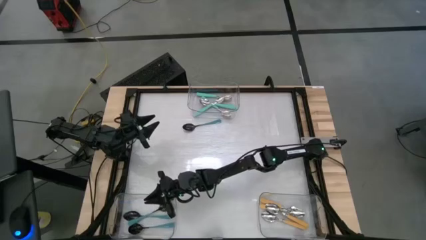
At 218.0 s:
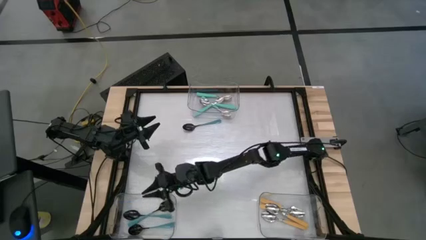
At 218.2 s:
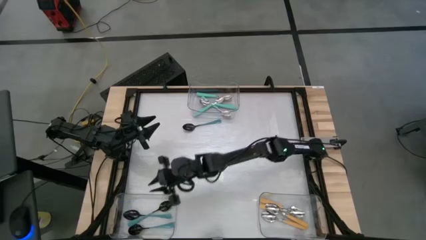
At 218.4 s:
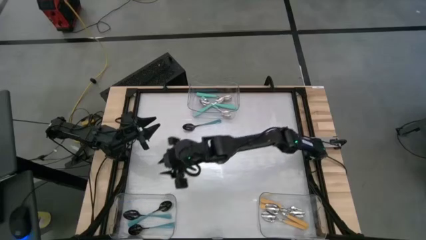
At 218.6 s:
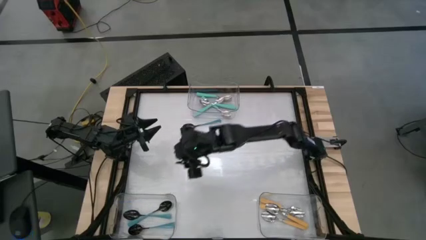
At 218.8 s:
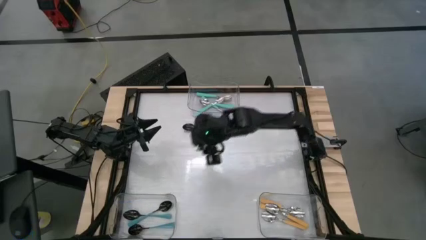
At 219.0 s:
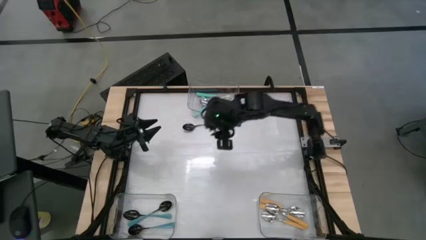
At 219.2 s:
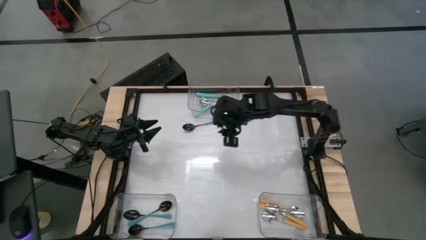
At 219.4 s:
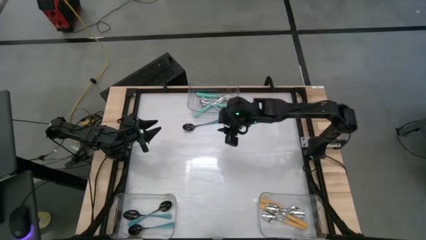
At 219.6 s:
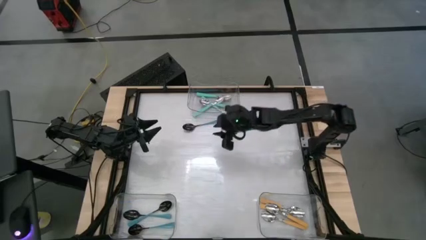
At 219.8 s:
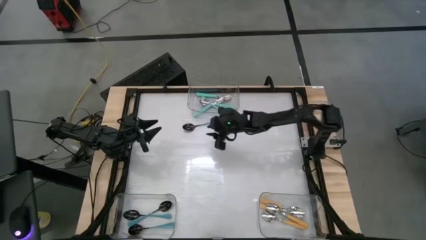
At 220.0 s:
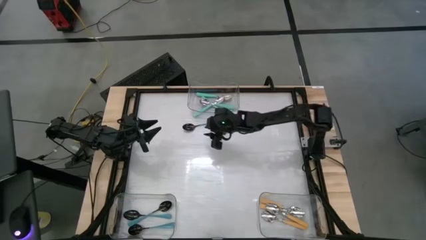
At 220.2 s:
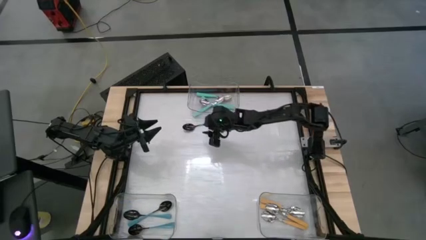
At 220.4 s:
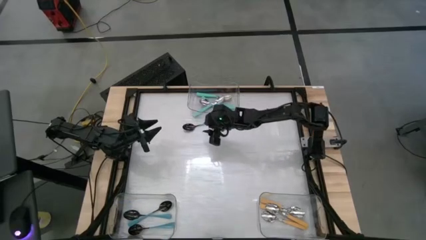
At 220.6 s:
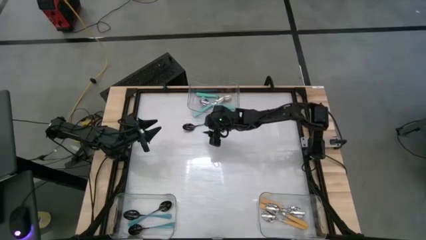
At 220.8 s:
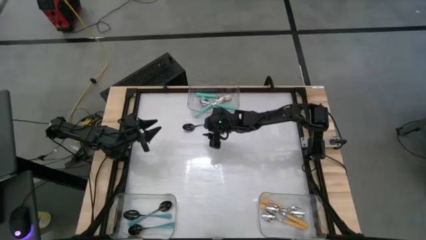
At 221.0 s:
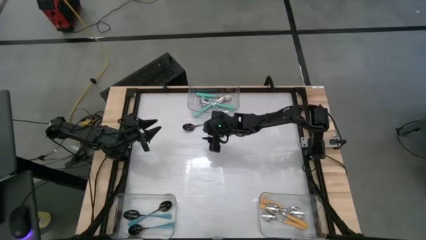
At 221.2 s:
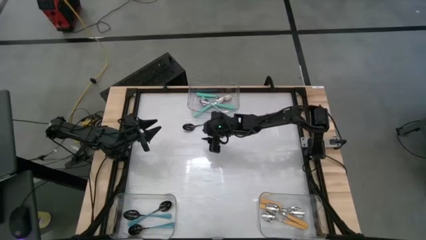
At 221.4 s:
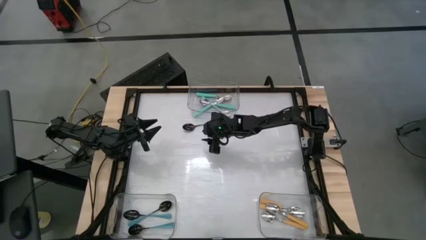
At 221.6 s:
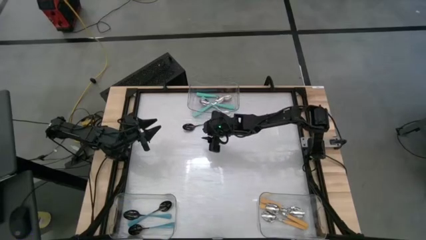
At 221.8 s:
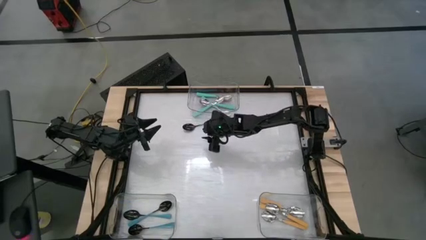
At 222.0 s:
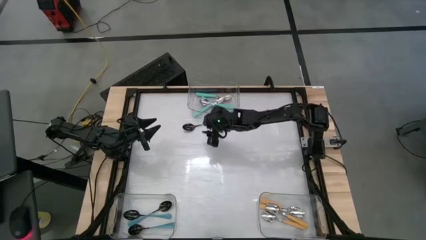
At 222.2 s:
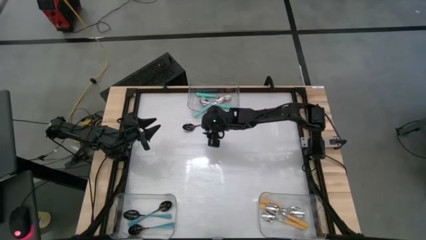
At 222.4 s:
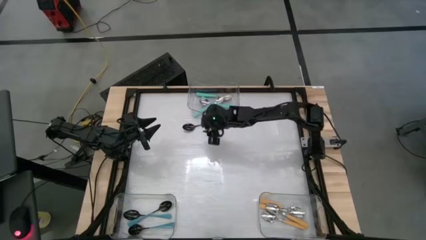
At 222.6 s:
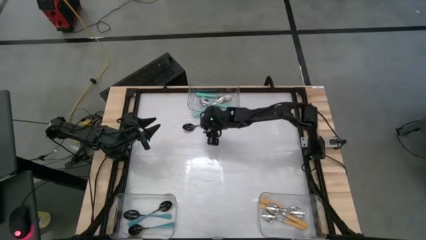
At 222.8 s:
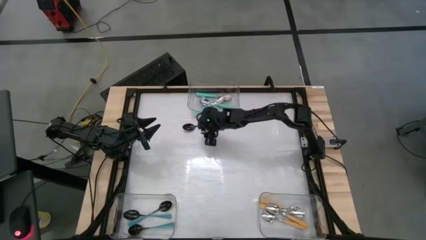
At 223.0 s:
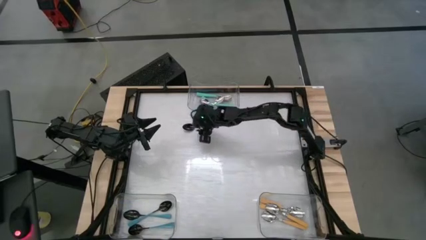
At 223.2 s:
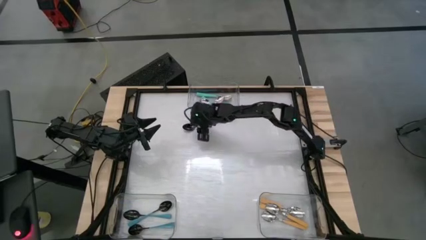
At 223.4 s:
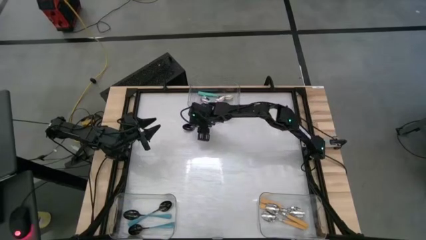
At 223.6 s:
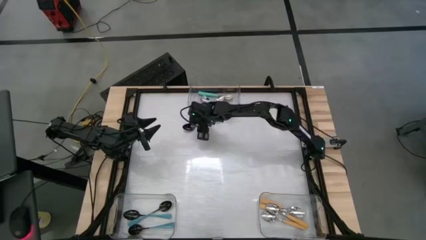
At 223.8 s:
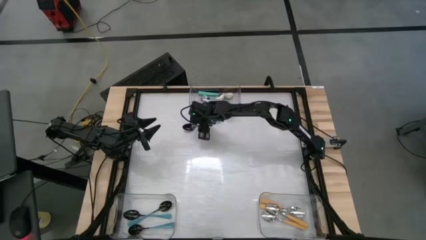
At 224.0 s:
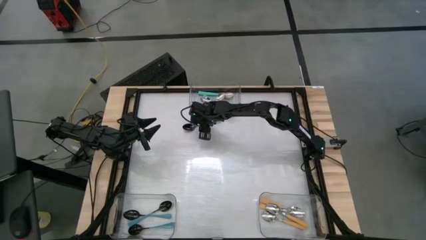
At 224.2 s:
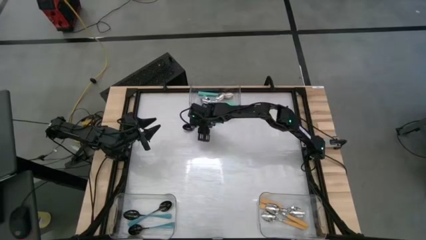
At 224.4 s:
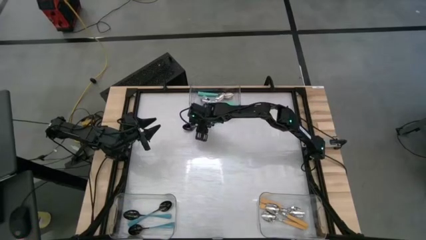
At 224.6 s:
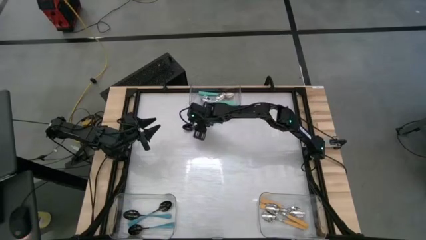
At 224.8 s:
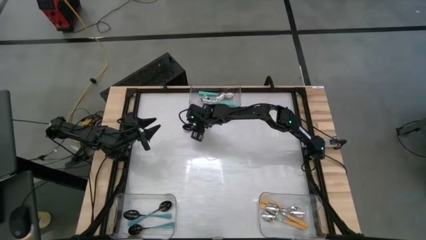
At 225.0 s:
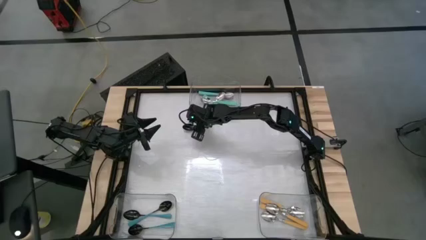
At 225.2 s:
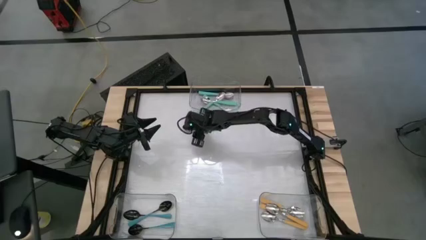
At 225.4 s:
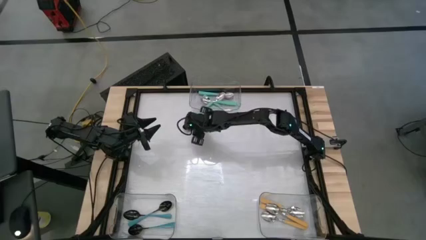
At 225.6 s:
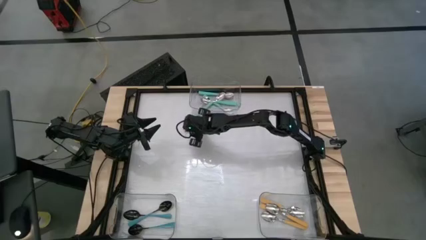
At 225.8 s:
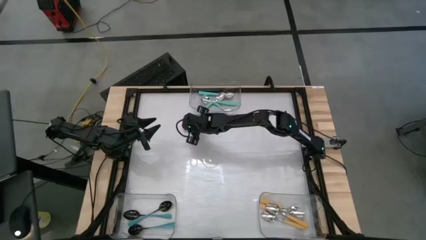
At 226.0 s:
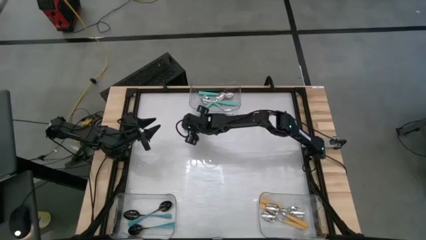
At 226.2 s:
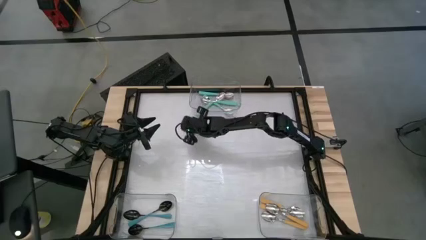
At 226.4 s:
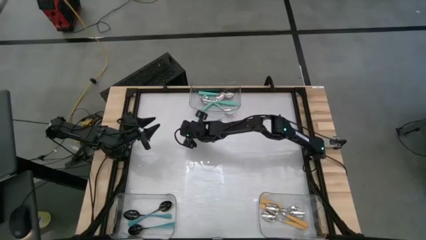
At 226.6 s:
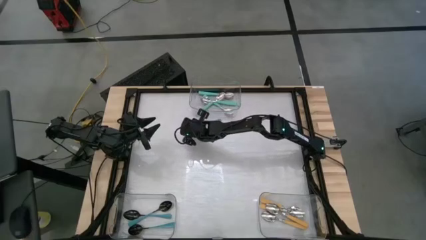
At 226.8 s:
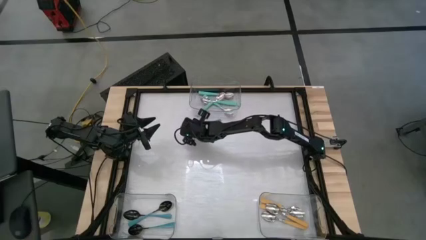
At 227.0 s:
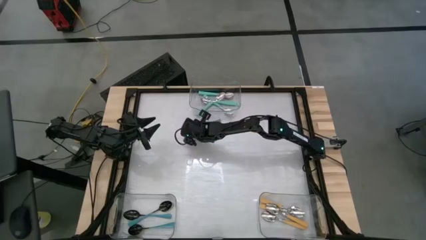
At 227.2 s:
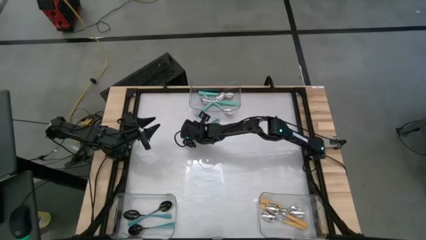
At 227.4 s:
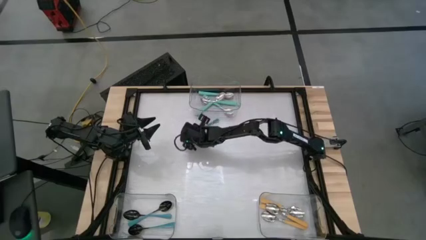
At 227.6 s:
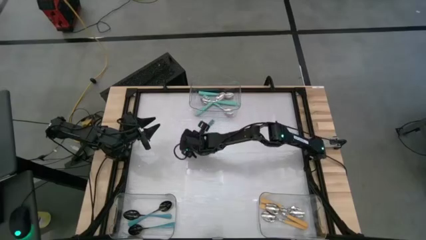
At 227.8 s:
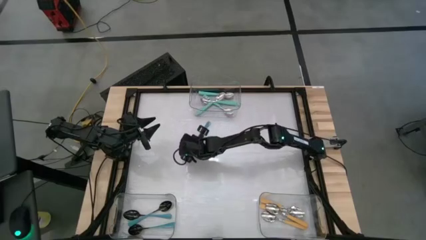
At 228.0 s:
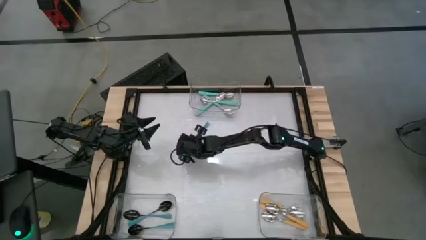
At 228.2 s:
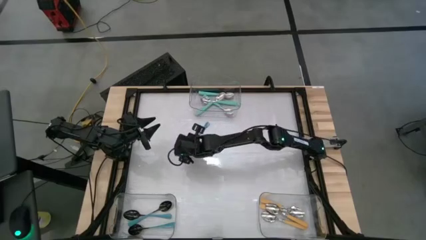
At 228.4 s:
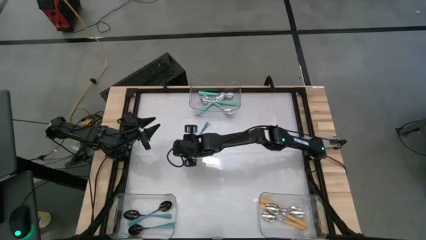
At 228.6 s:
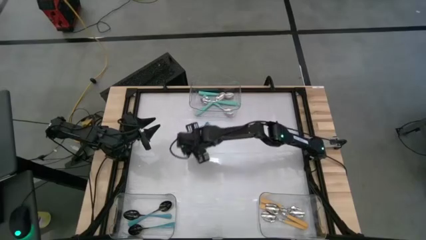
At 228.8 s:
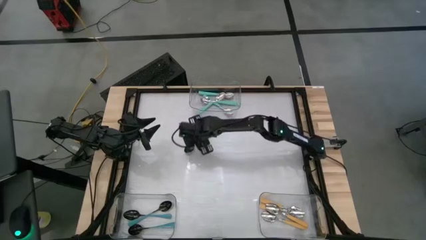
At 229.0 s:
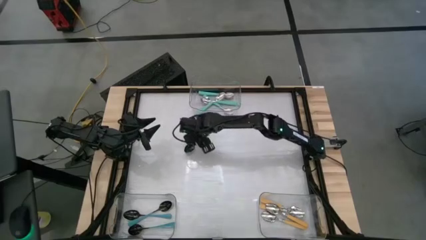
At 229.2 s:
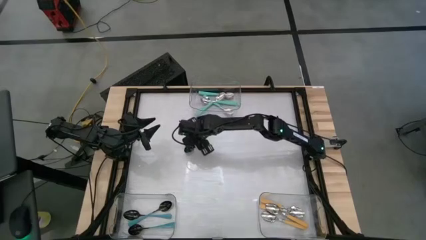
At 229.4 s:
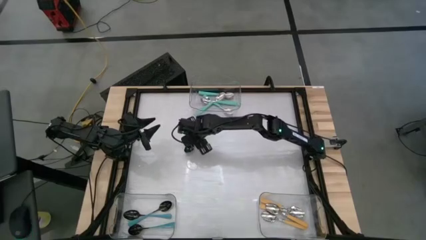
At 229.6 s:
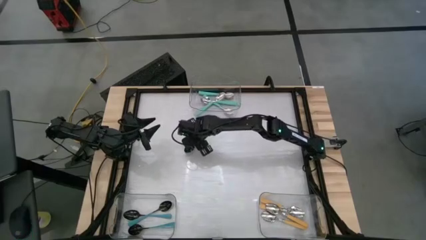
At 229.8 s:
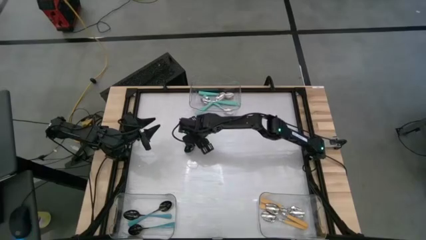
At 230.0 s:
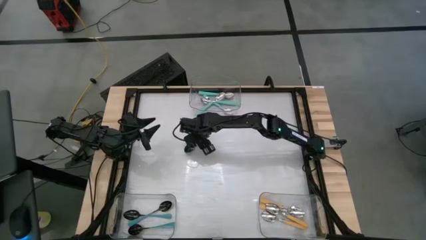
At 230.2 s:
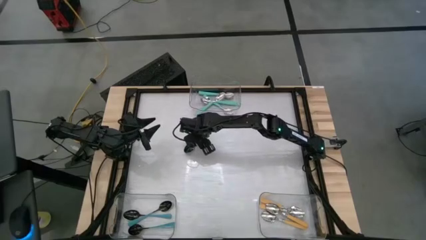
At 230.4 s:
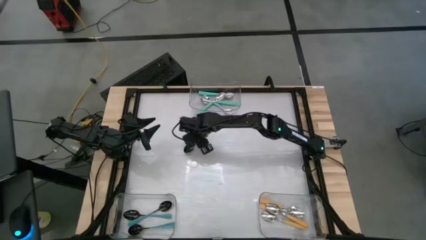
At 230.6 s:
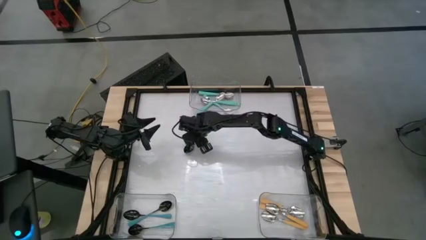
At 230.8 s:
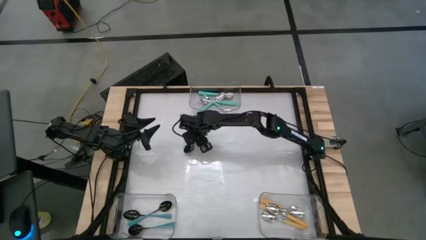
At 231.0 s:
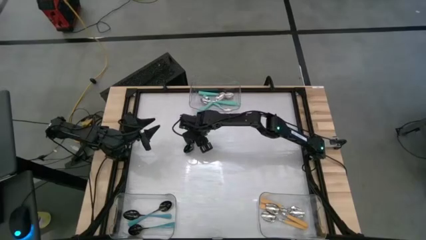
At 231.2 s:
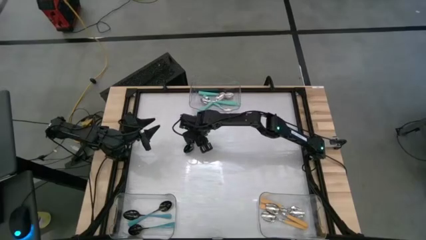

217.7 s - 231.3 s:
Task: Sort silverware by color (type)
Put the black spoon into the bottom left transparent bin

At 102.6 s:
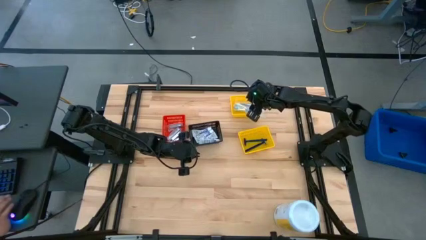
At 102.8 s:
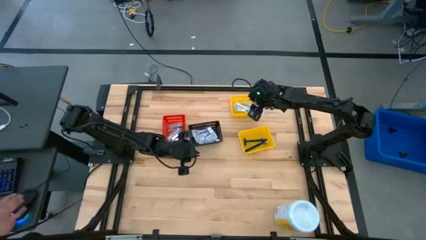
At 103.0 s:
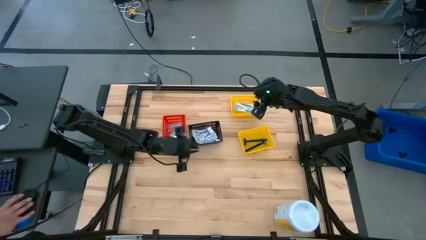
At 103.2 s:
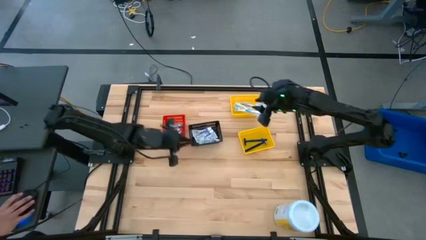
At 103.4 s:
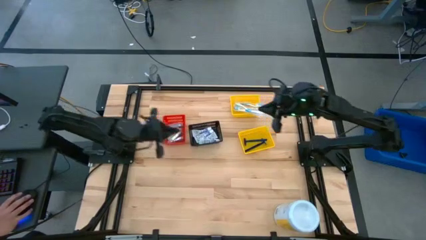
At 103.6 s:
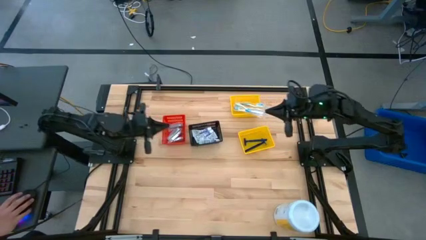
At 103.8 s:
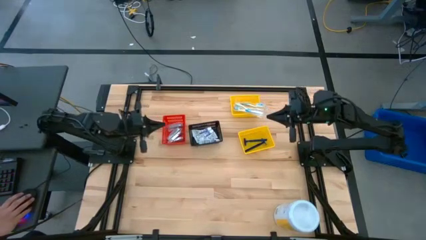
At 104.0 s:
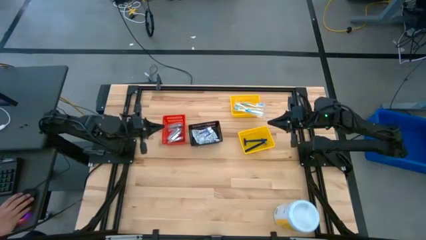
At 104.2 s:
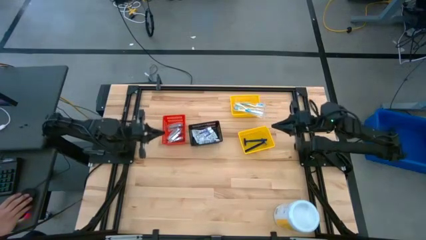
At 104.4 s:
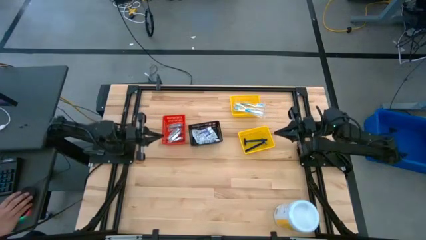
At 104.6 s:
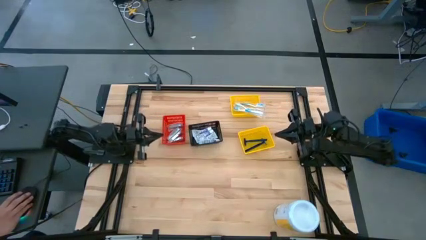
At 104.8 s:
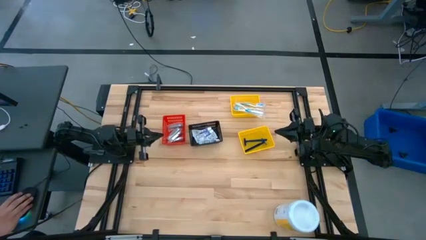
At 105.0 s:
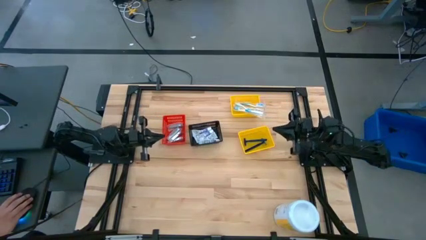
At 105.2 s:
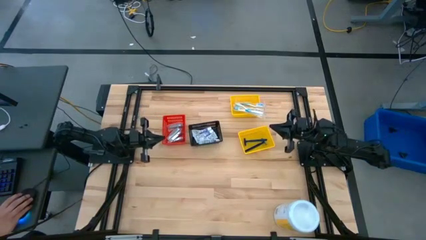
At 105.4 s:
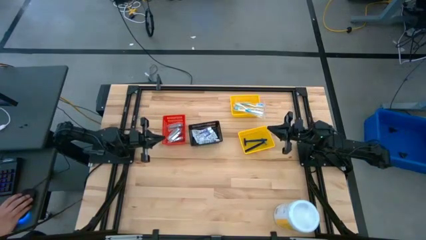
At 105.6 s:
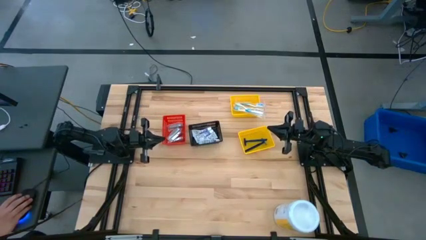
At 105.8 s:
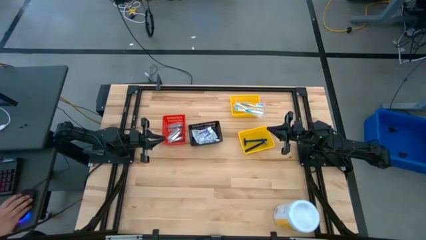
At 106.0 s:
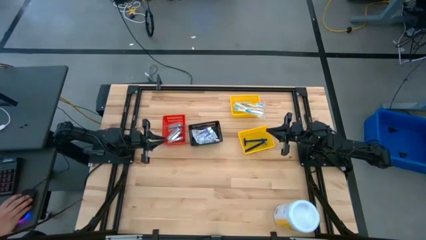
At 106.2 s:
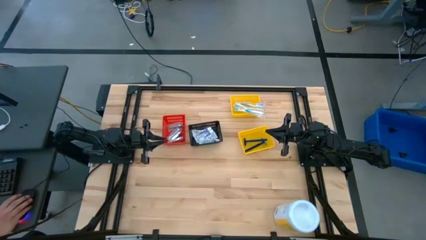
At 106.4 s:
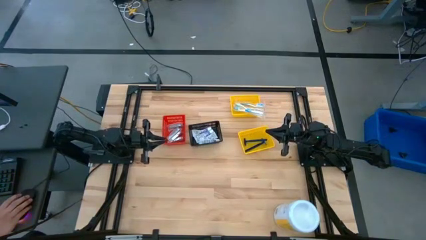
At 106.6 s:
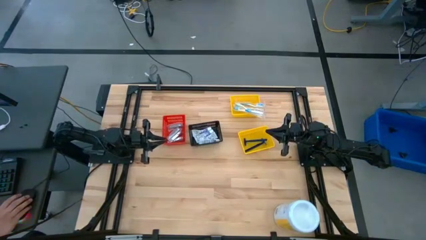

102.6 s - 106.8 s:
Task: Pick & Place Travel size toiletries
Return to Home Position
